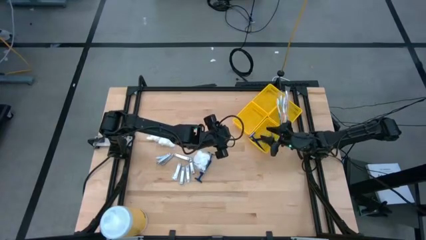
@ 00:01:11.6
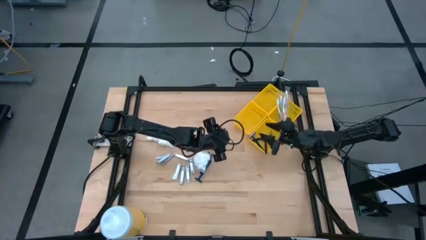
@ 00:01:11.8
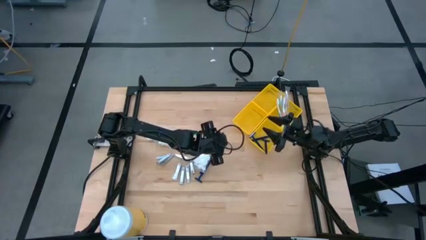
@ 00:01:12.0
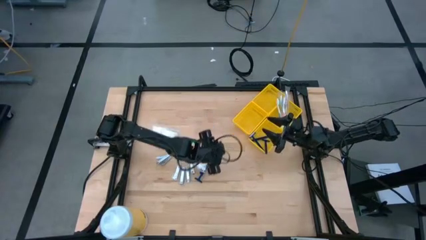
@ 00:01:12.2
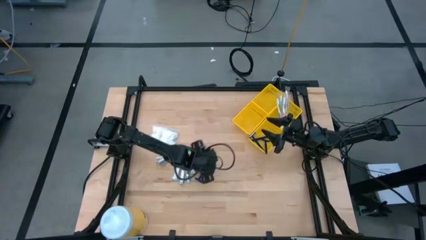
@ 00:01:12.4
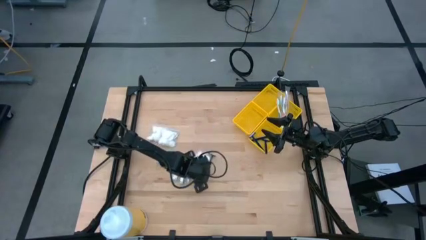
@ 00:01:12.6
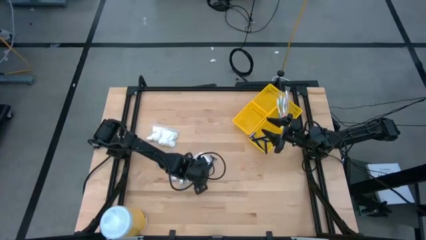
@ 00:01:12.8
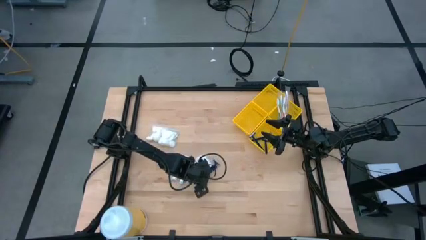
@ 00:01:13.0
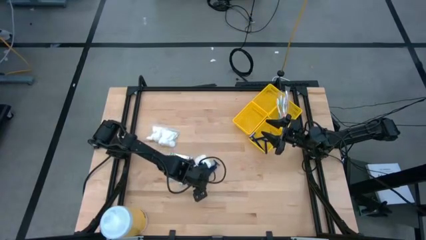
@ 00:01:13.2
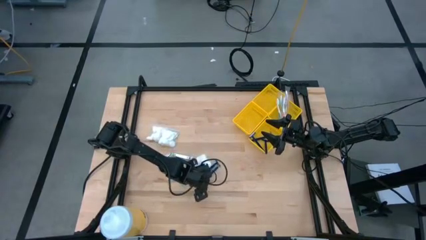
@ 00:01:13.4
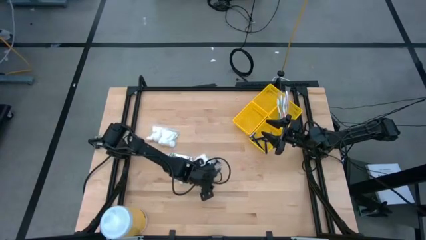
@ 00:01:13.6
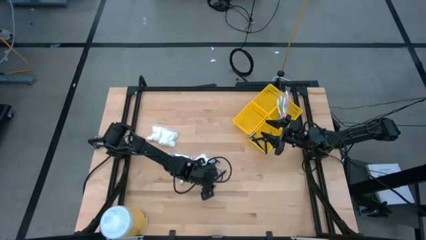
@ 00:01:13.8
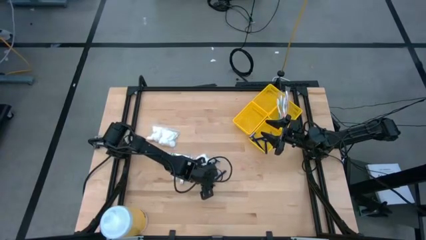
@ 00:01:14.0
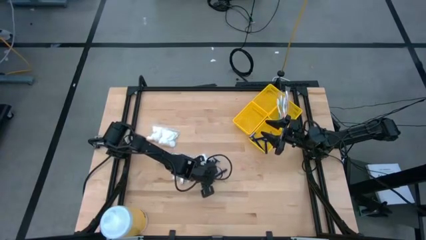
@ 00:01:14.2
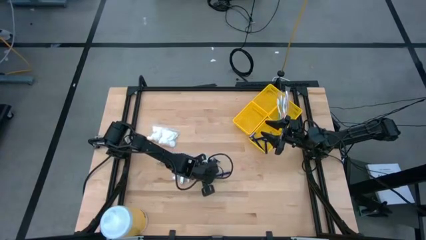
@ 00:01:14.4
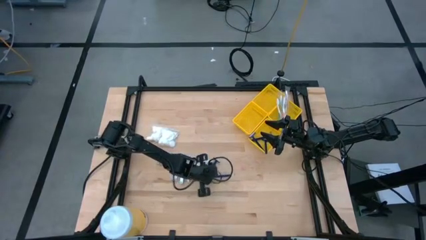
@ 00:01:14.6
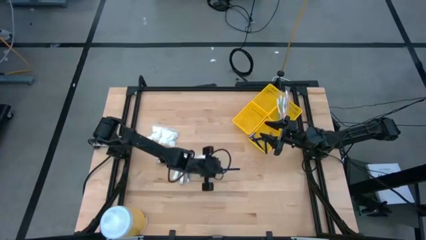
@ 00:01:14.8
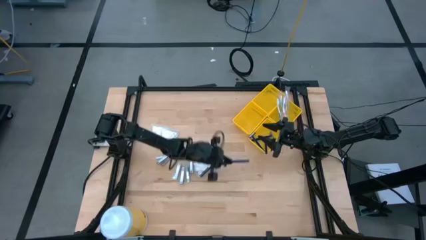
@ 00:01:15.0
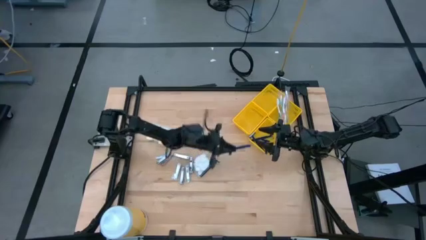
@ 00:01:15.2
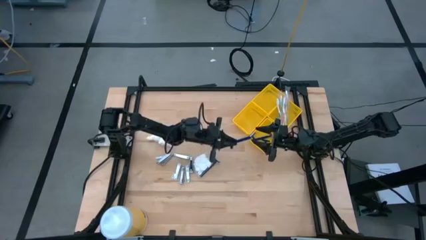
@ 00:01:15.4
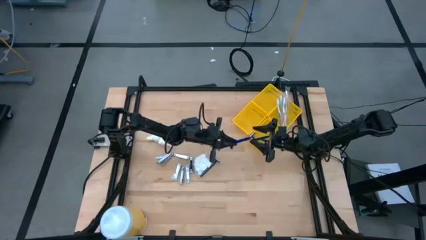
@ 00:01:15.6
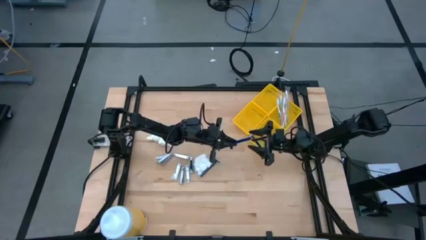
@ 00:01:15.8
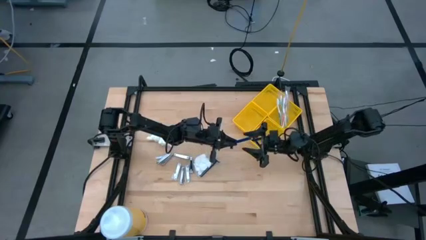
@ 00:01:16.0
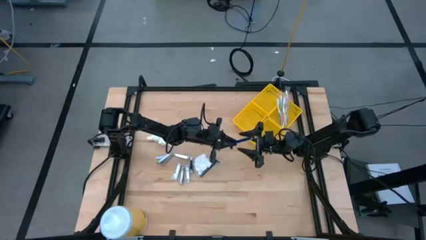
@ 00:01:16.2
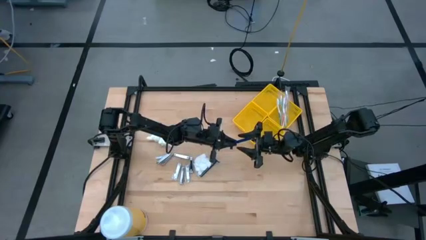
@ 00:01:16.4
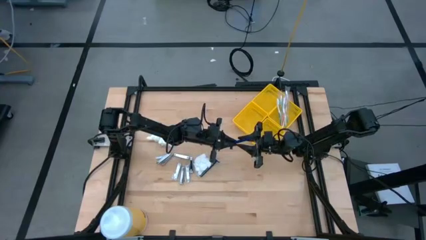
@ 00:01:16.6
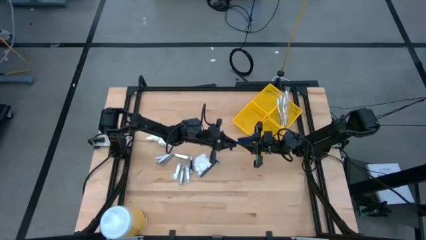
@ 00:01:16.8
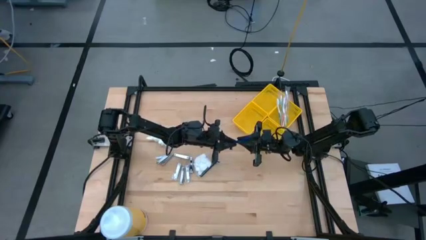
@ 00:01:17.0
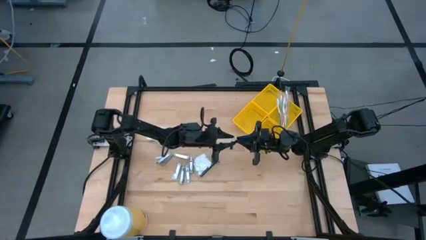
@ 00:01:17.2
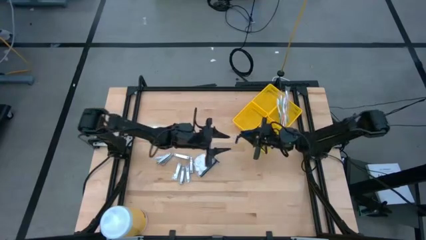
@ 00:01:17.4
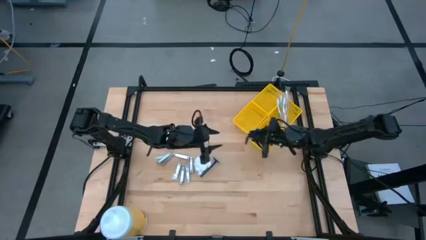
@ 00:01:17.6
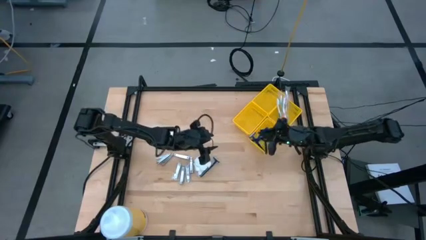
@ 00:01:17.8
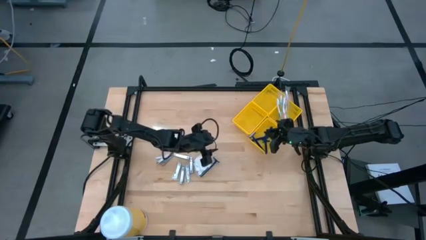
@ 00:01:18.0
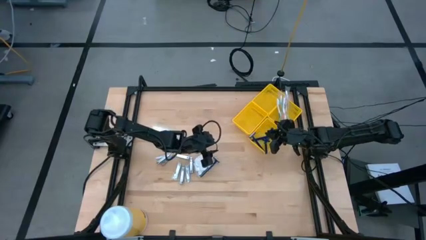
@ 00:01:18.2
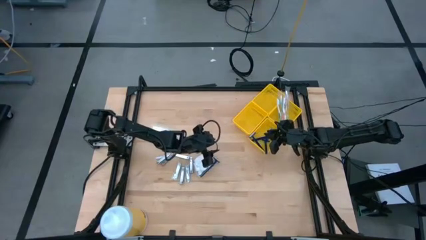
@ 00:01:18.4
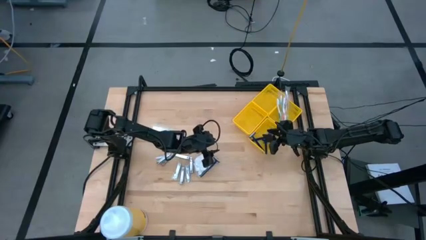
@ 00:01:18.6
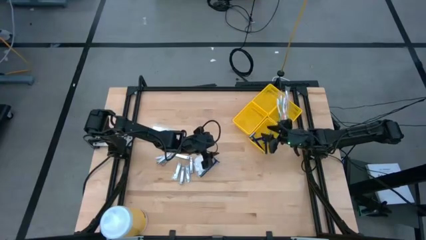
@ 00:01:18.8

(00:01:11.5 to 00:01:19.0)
Task: Pick & Place Travel size toiletries
Put the blue razor into the bottom right yellow bin

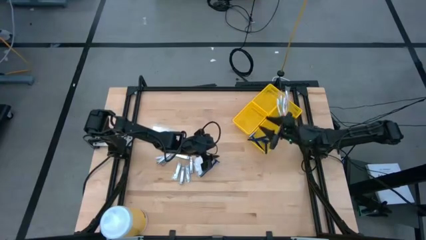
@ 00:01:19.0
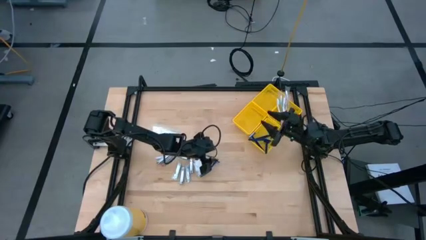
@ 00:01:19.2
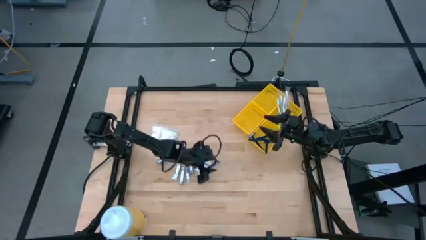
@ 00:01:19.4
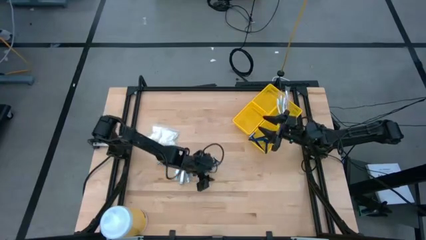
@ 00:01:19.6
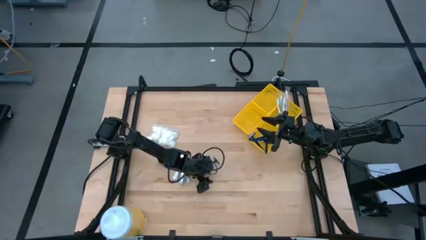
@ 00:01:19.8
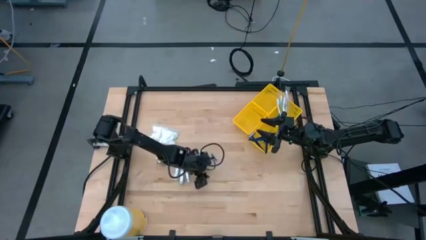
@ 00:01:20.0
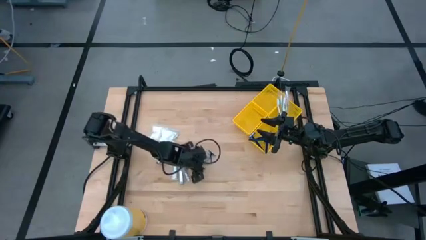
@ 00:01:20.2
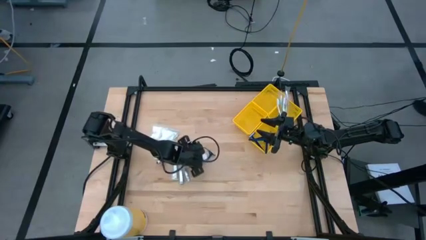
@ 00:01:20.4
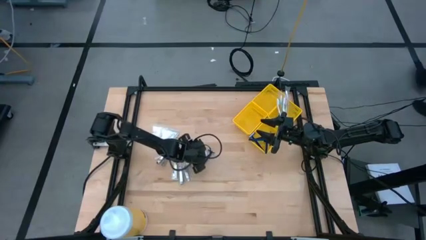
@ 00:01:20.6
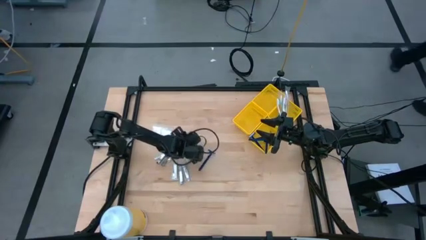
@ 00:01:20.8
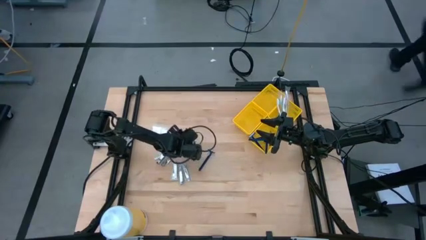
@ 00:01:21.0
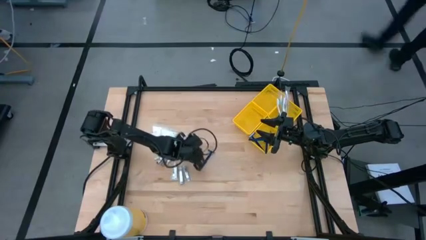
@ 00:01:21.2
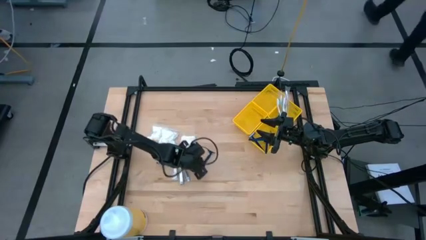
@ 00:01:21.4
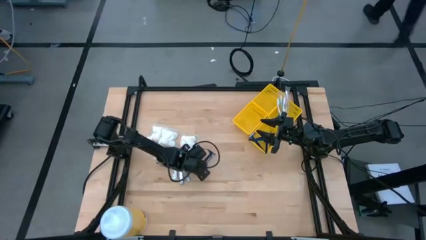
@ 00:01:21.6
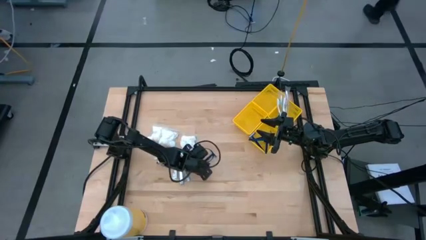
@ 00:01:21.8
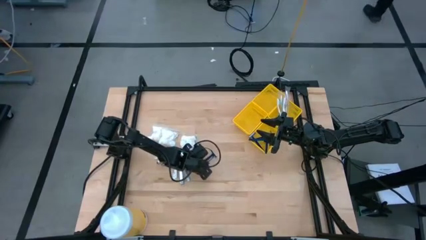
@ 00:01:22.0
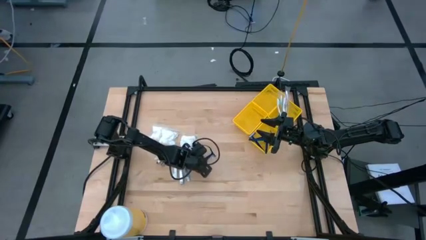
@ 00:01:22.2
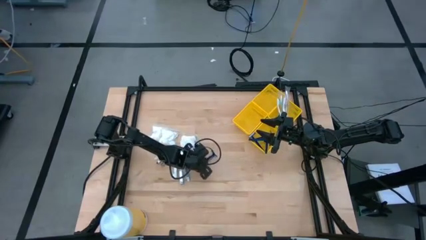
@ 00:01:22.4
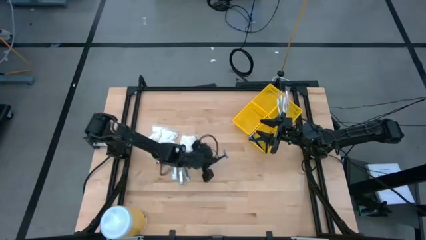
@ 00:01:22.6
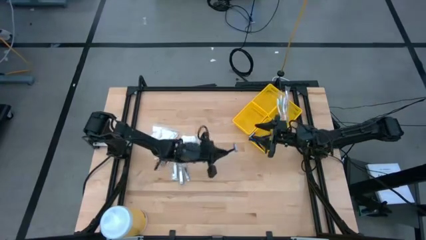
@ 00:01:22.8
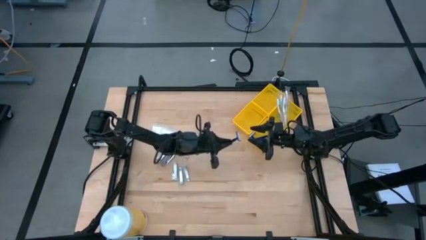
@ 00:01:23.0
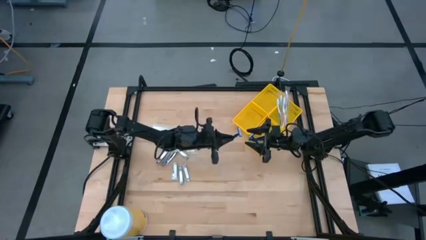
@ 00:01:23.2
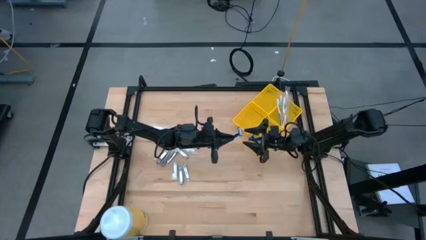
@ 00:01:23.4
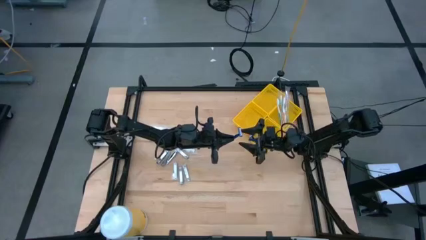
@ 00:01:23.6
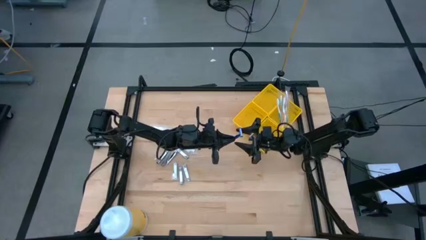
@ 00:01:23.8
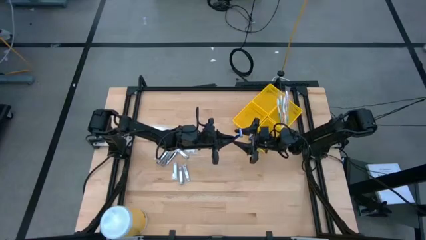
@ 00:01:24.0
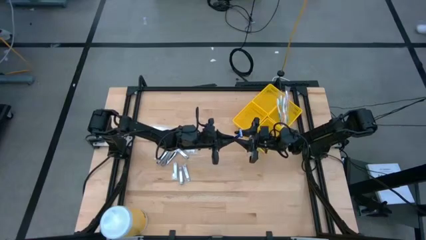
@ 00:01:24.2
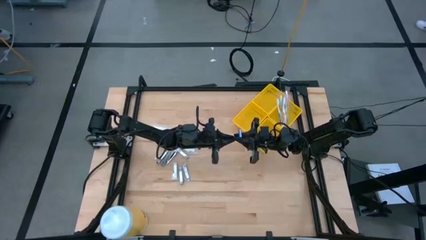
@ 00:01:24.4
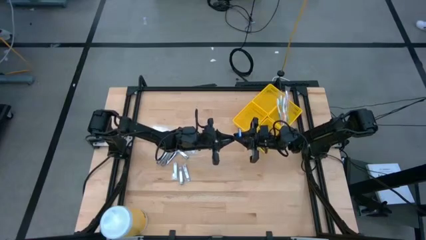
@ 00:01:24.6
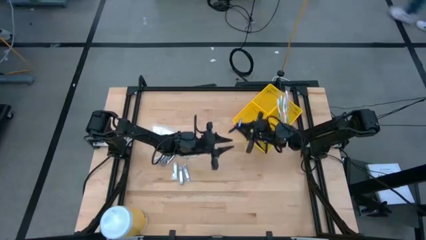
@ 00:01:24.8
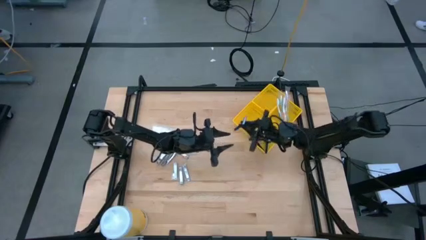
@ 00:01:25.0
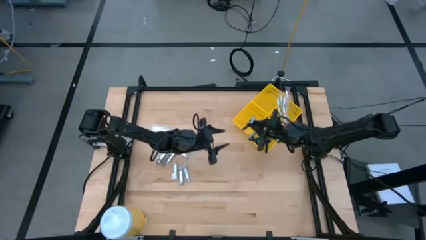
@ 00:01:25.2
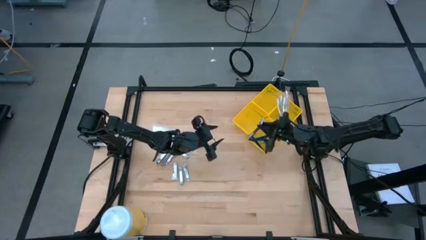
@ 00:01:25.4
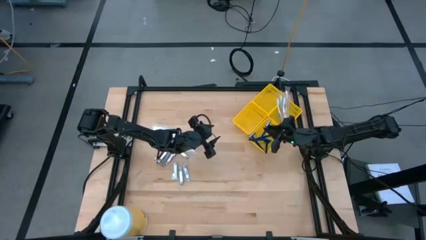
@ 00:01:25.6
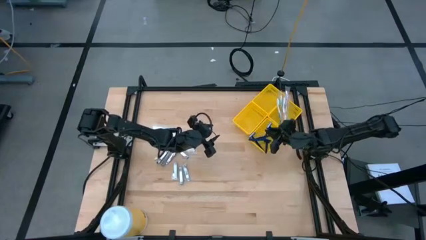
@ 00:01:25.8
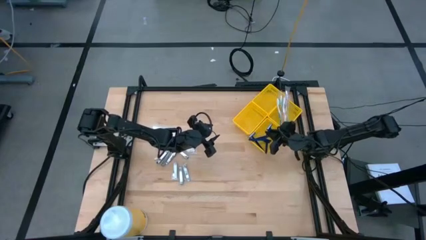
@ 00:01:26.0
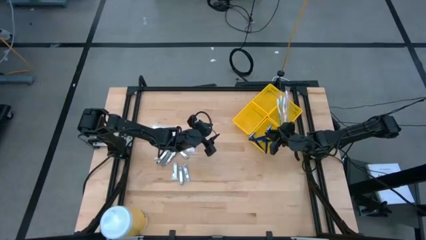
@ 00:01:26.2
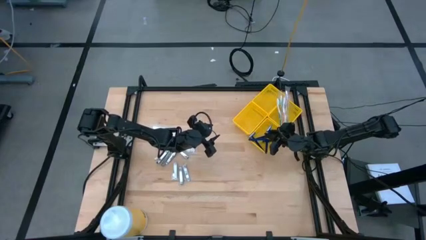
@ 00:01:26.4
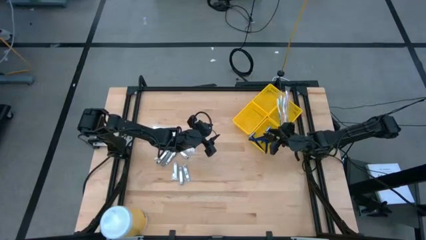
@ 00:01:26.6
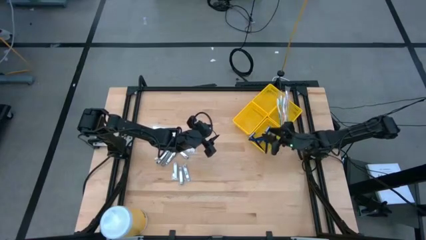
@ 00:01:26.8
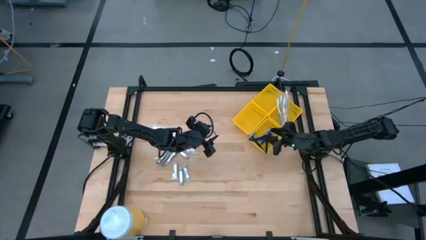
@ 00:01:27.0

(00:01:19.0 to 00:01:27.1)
Put the blue razor into the bottom right yellow bin
